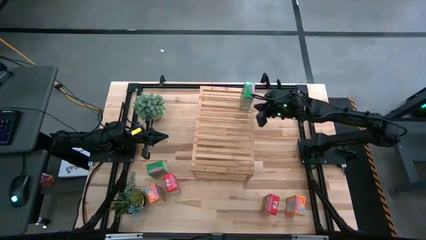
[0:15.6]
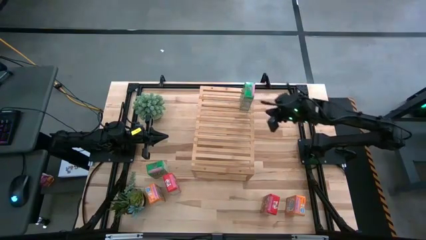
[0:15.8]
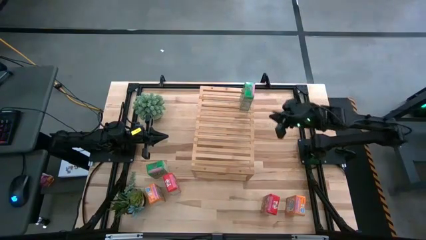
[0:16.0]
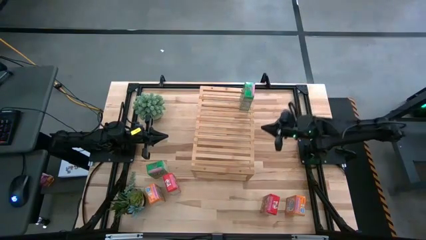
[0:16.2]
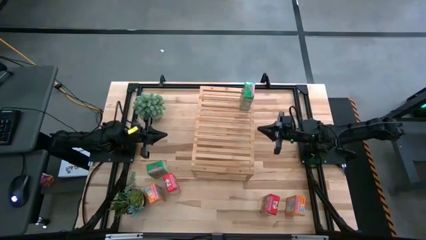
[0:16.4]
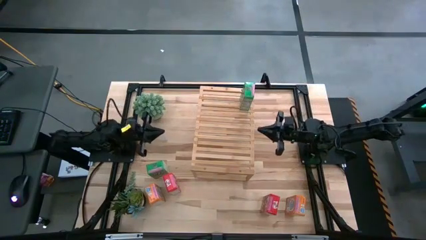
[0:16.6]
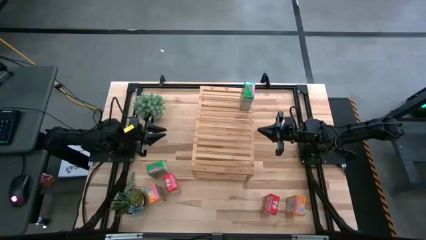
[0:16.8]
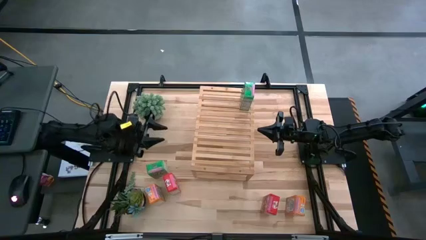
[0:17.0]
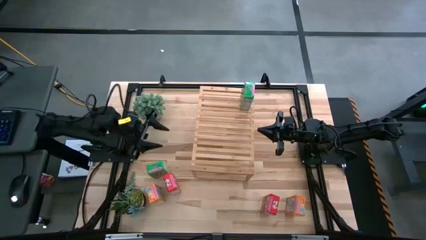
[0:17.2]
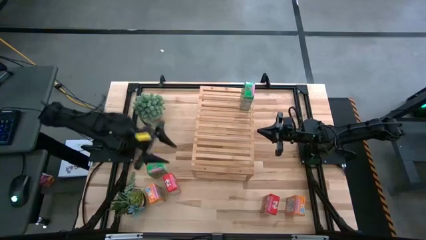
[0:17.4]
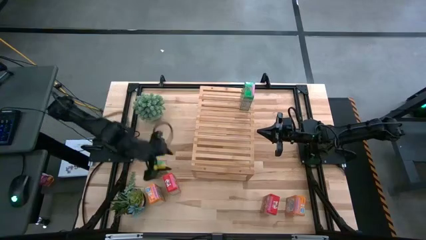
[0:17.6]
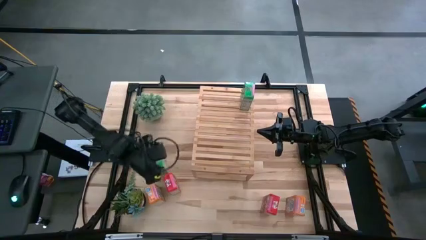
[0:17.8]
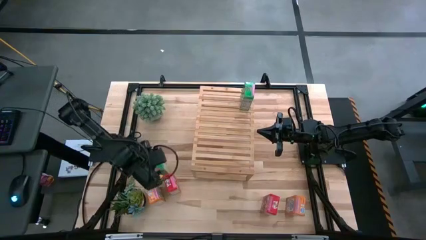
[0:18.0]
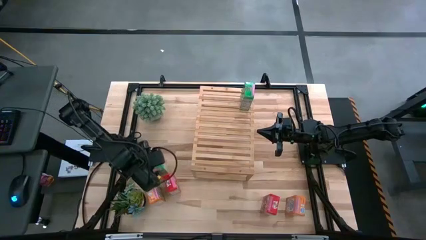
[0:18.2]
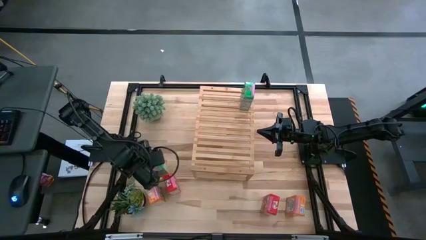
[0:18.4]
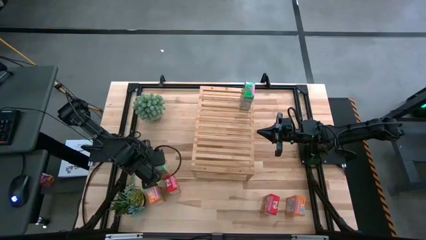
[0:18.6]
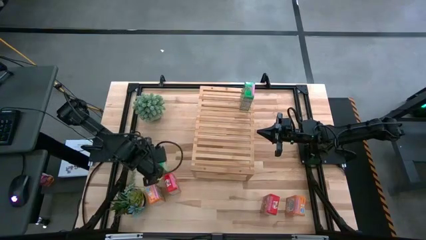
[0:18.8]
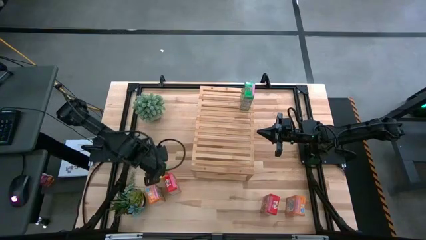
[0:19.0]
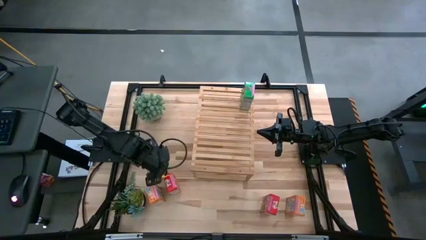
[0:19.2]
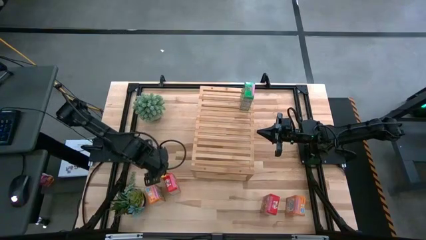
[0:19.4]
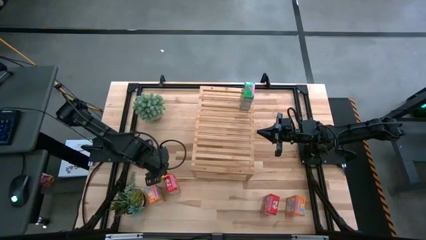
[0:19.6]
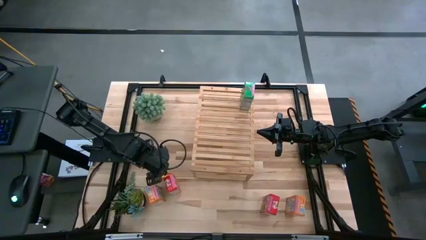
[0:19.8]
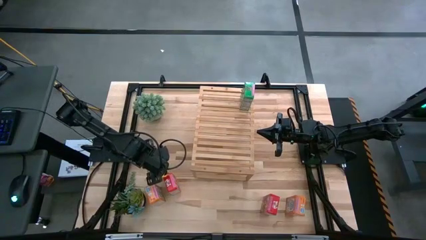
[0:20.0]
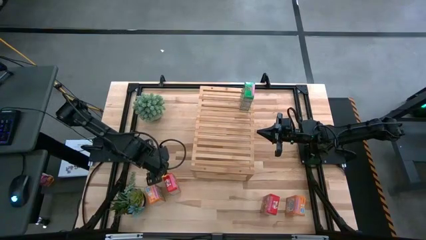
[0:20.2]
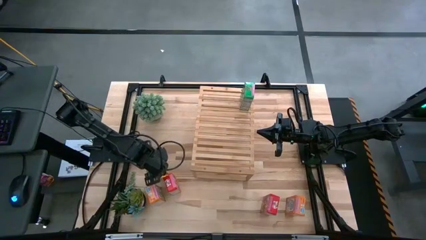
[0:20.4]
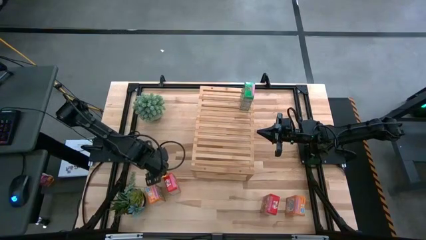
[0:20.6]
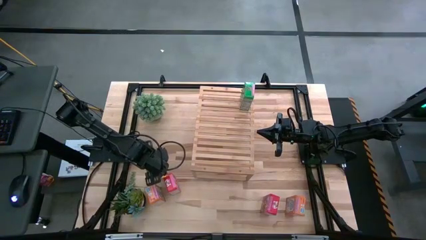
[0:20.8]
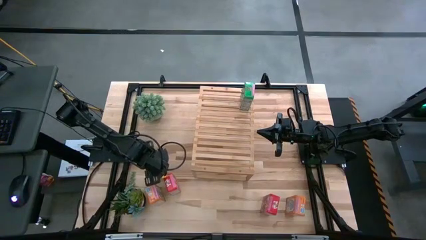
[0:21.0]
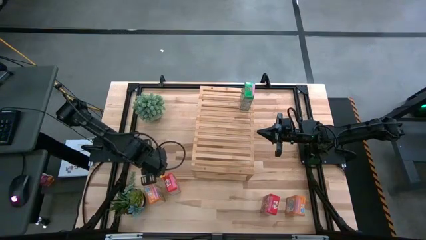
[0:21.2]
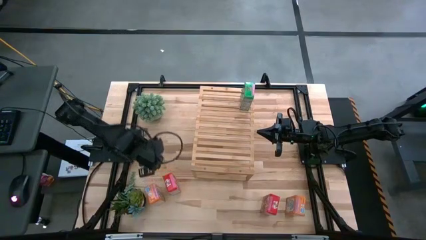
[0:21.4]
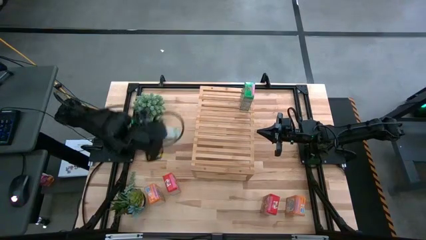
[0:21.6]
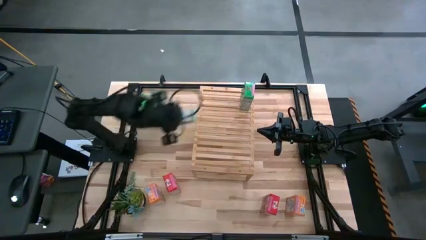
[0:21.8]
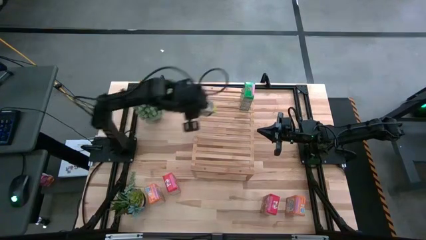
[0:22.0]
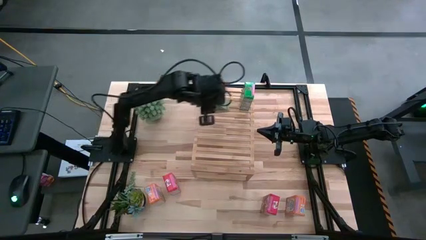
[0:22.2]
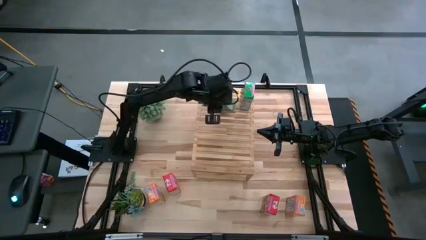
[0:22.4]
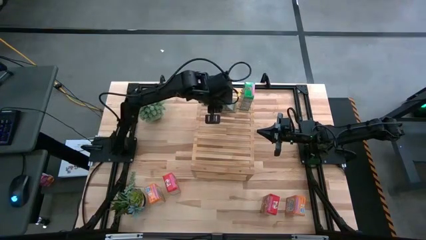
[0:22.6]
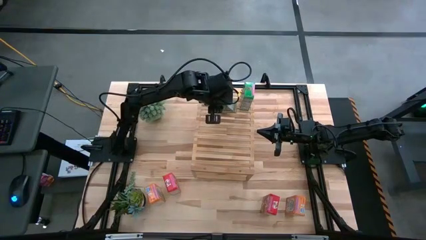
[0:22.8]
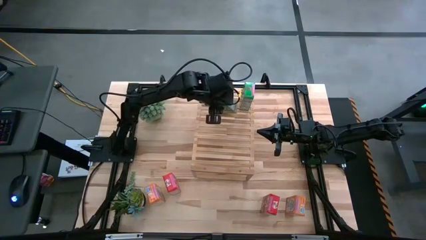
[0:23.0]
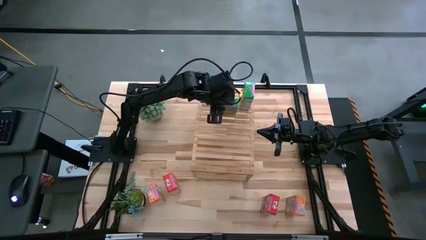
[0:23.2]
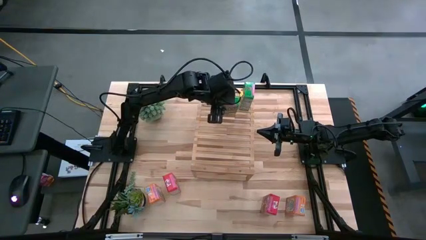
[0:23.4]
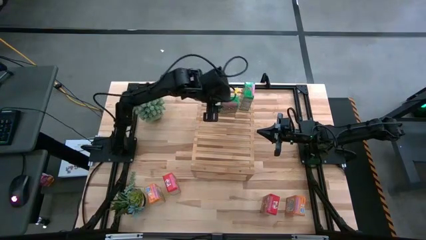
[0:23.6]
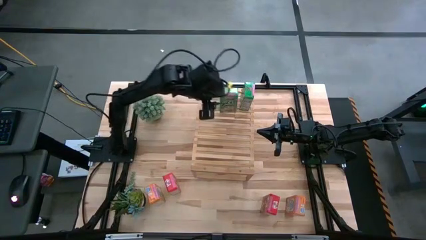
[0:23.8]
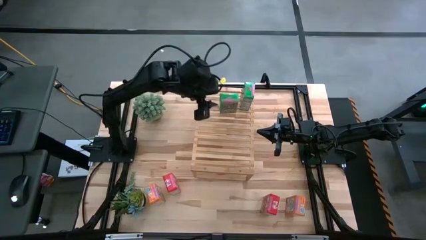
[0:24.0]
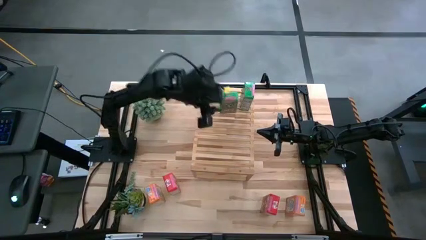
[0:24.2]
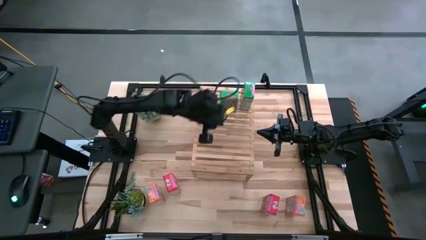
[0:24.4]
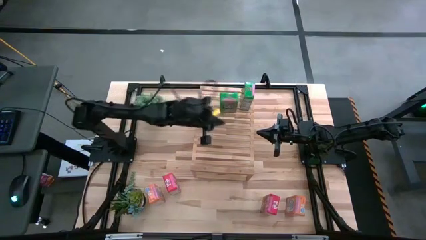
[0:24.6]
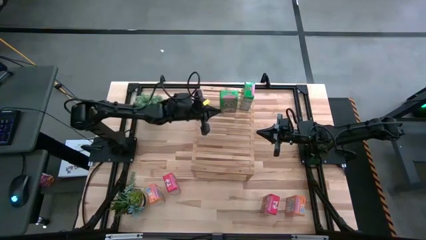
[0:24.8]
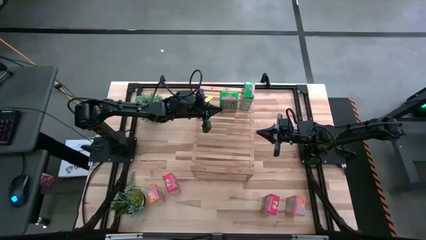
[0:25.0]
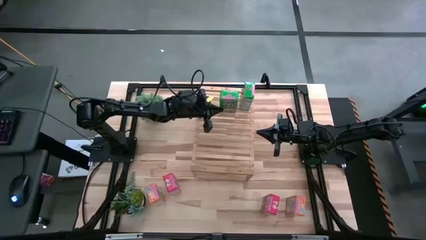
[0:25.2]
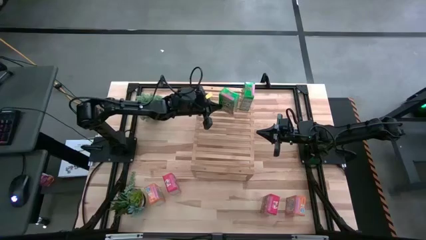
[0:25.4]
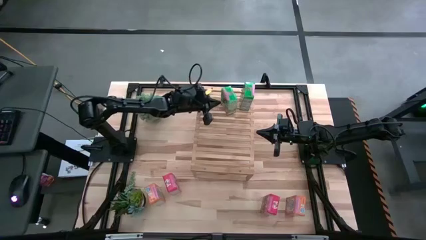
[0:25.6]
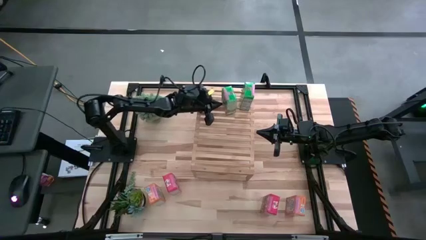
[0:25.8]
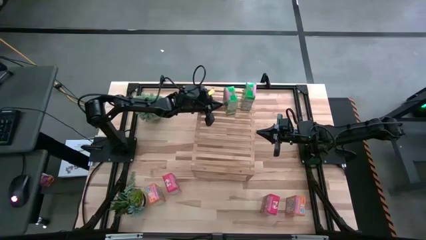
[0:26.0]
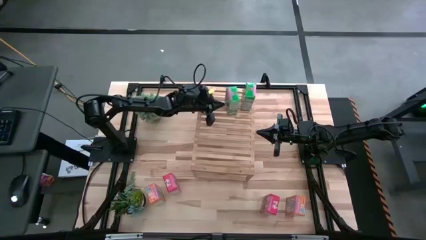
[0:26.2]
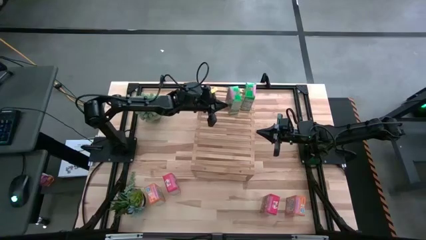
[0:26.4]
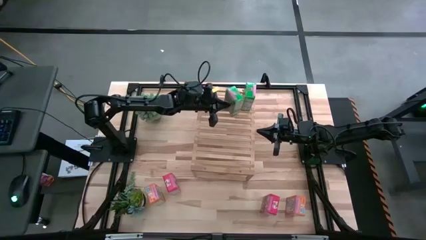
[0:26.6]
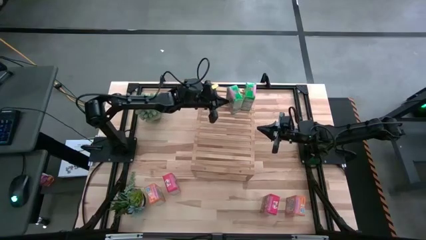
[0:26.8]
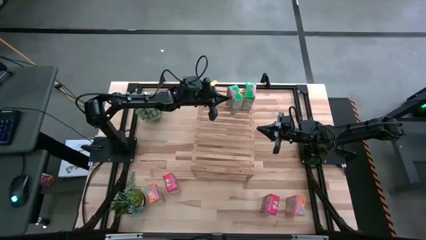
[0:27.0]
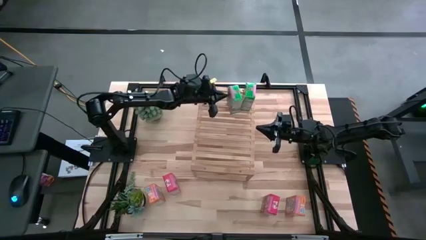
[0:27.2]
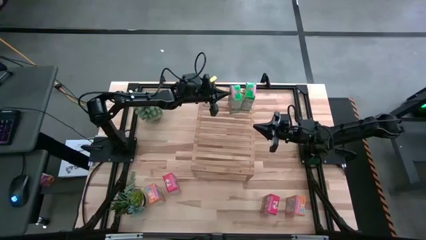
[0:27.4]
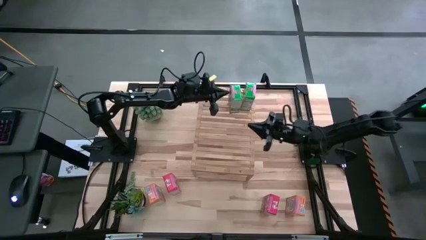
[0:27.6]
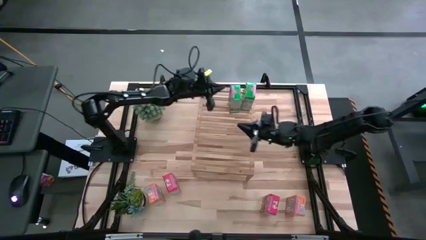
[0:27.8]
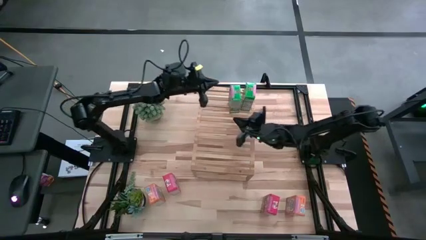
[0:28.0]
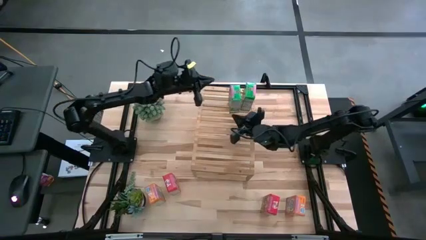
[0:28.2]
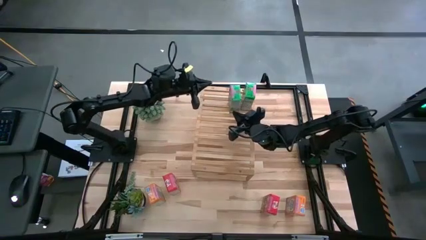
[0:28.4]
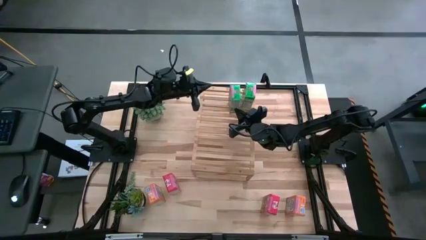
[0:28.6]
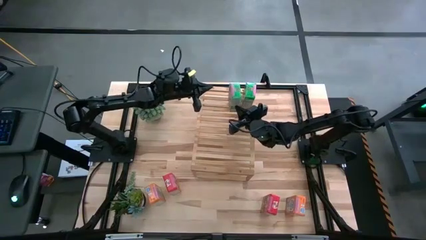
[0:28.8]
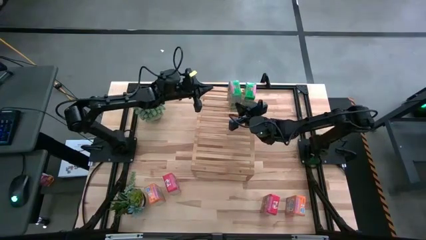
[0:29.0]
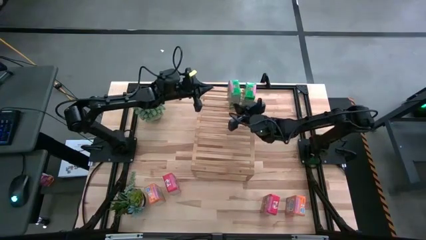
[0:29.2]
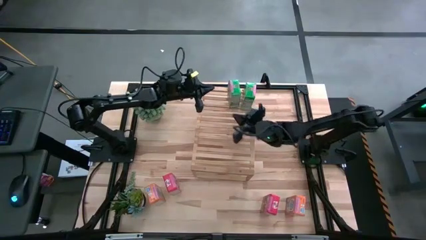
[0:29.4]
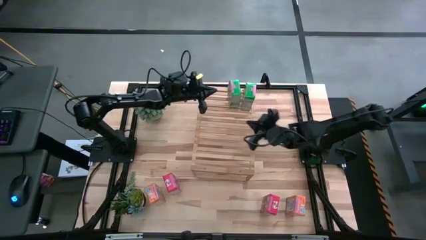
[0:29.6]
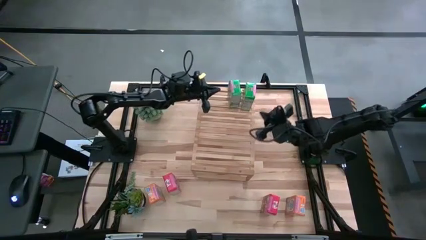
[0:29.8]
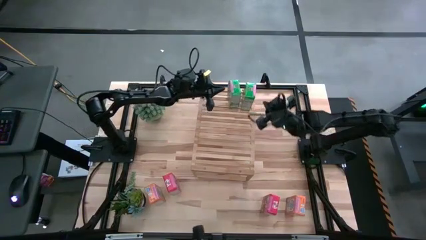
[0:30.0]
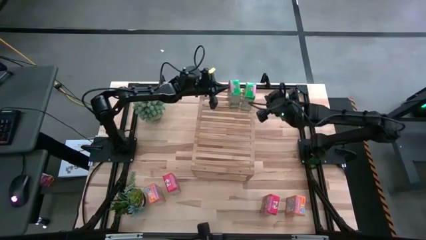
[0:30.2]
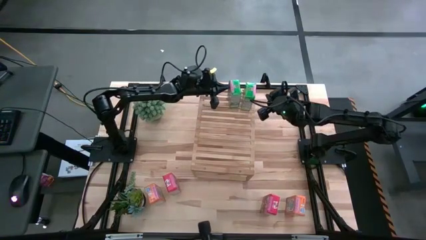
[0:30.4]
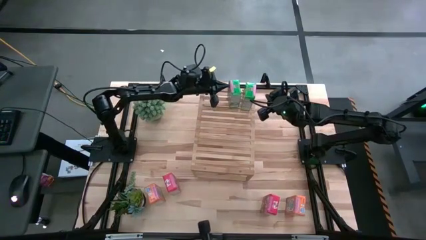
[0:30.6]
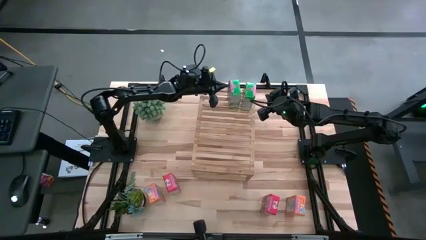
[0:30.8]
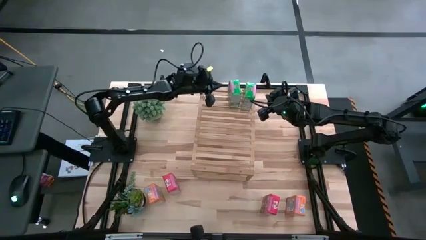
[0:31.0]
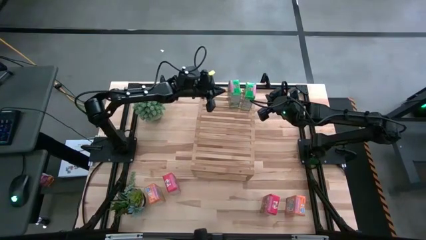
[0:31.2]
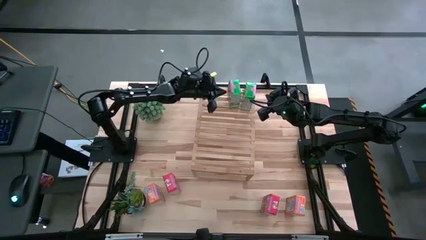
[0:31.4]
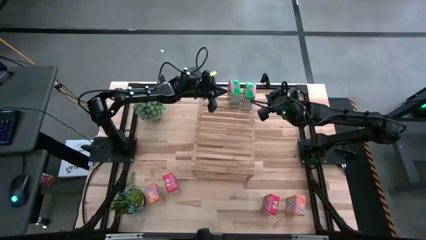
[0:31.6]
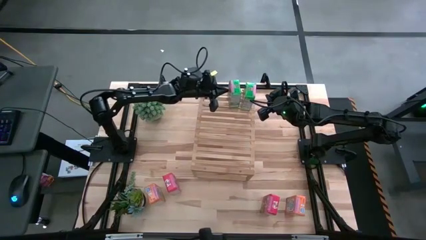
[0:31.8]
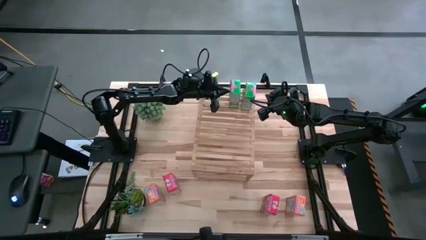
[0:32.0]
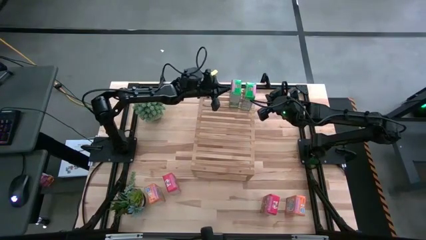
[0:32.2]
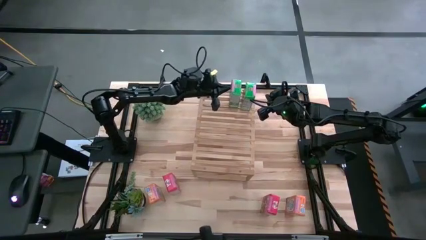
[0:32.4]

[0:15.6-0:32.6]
Task: Stack cereal on shelf
Put the green cereal box on the shelf aligned with the other green cereal box
